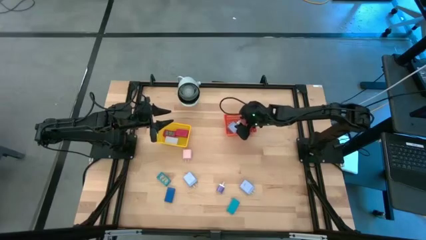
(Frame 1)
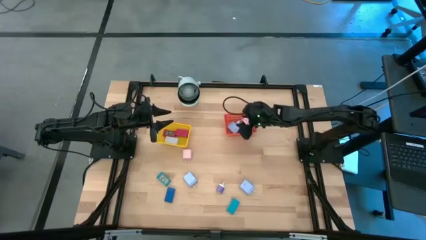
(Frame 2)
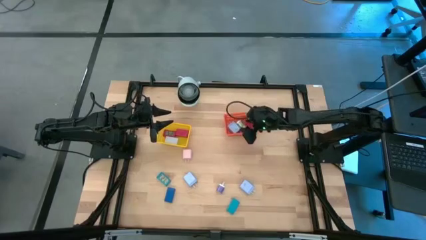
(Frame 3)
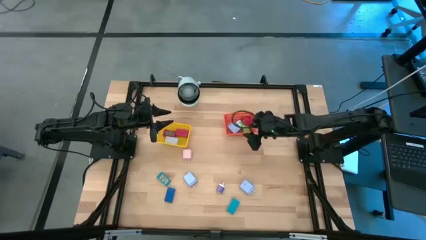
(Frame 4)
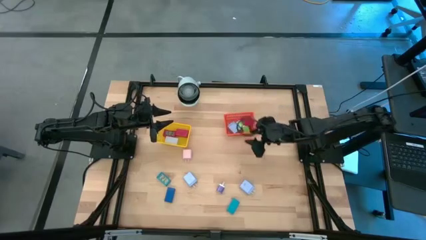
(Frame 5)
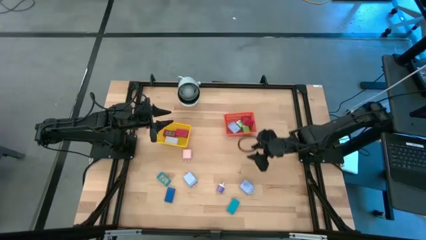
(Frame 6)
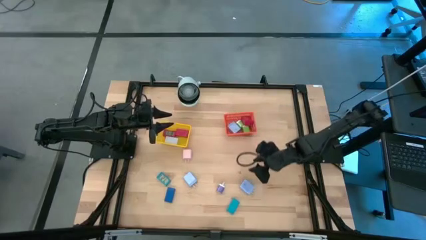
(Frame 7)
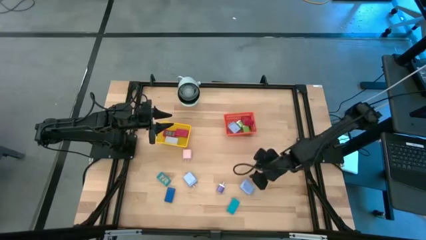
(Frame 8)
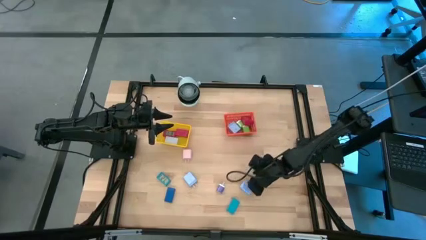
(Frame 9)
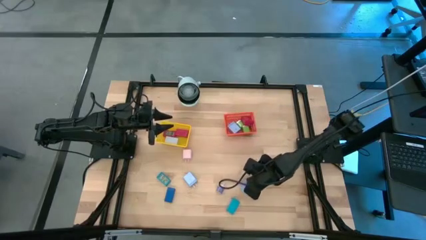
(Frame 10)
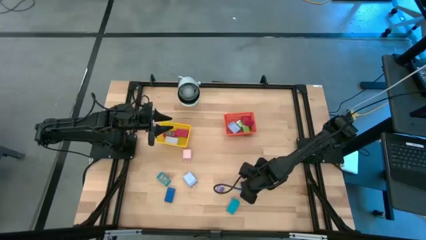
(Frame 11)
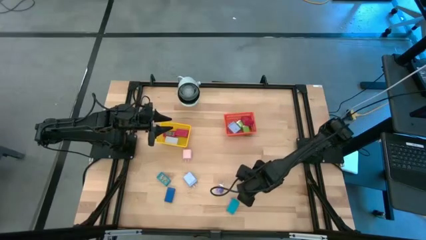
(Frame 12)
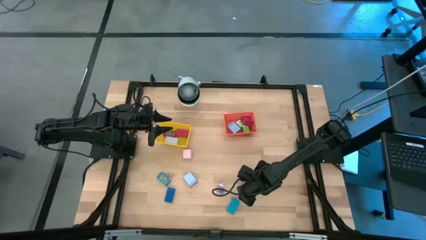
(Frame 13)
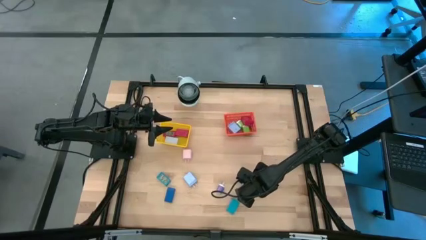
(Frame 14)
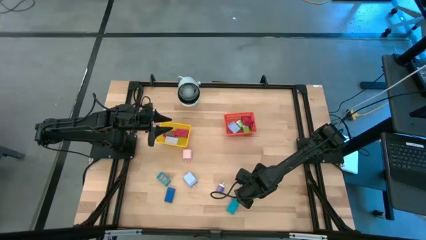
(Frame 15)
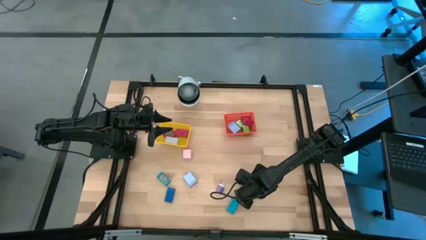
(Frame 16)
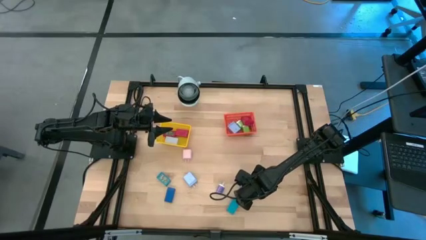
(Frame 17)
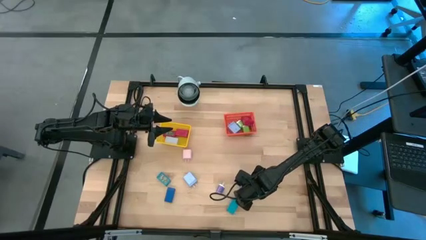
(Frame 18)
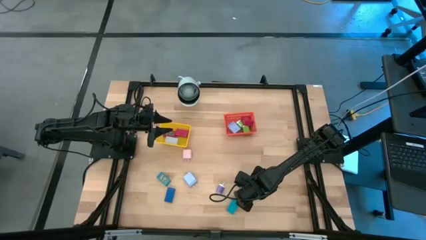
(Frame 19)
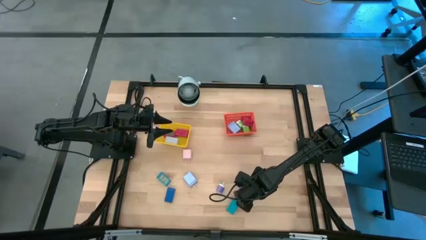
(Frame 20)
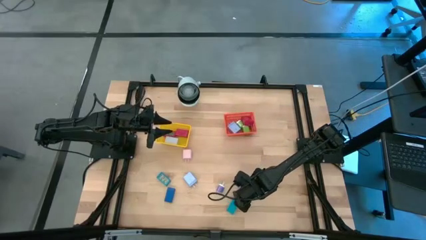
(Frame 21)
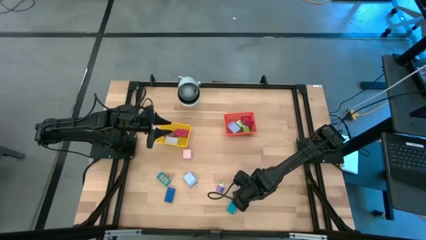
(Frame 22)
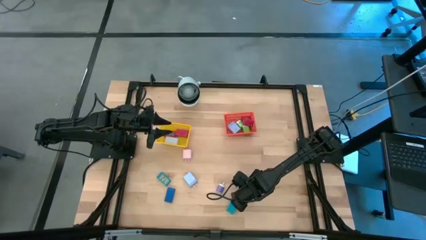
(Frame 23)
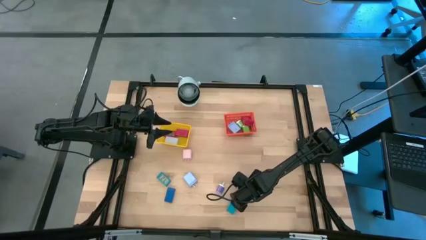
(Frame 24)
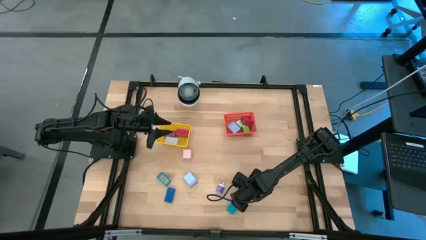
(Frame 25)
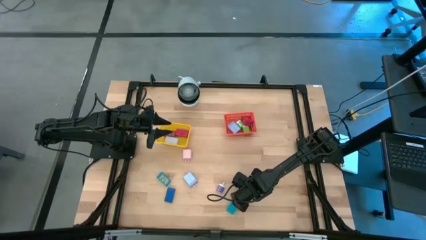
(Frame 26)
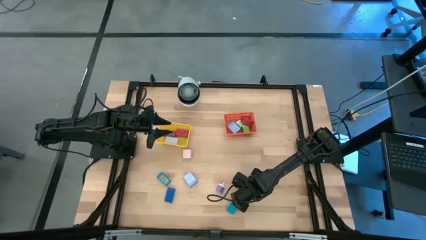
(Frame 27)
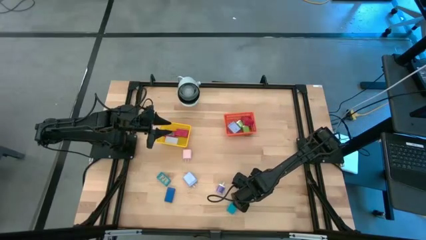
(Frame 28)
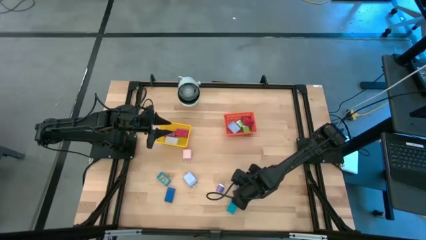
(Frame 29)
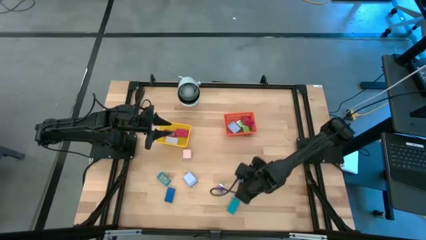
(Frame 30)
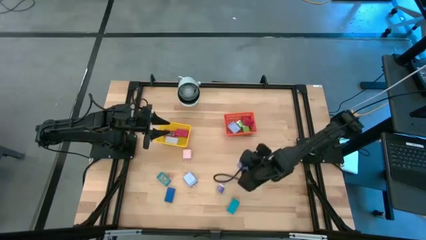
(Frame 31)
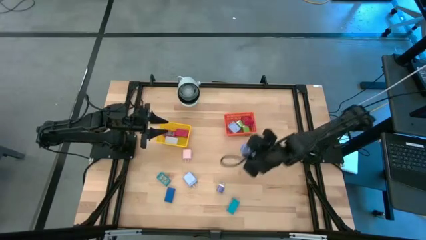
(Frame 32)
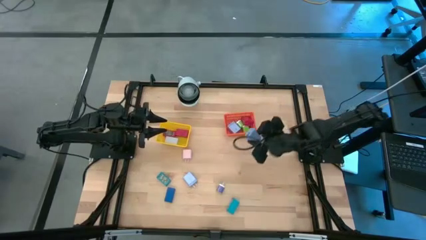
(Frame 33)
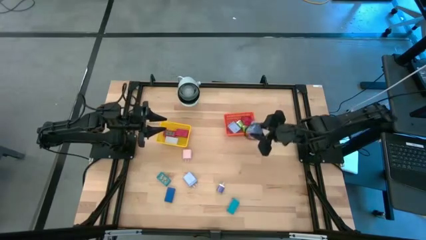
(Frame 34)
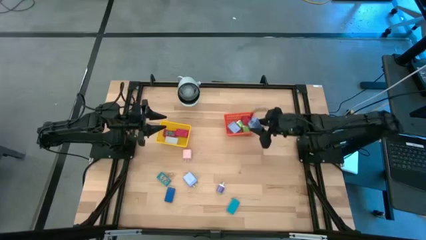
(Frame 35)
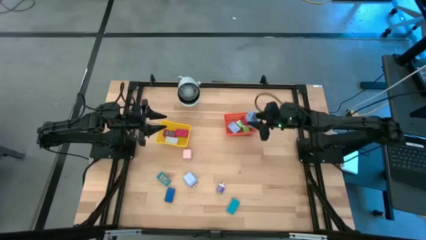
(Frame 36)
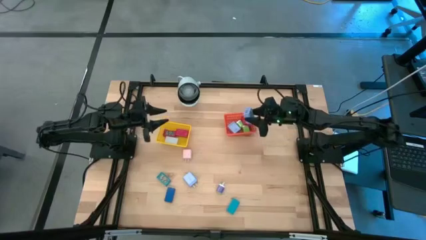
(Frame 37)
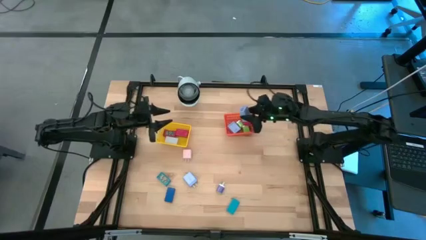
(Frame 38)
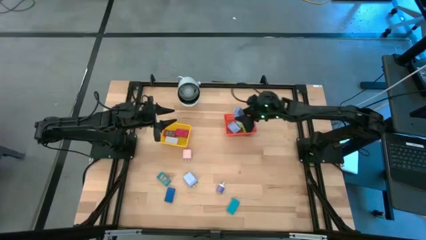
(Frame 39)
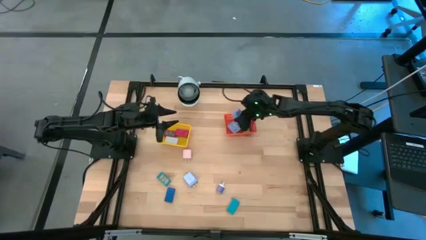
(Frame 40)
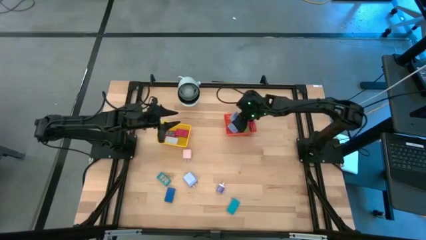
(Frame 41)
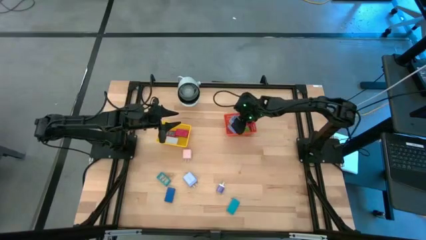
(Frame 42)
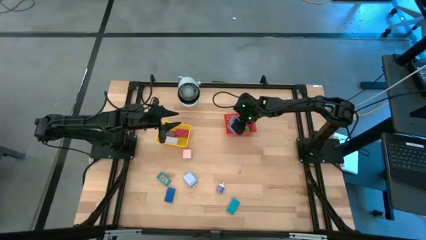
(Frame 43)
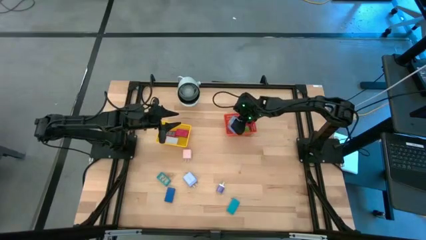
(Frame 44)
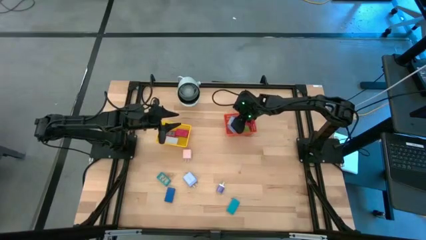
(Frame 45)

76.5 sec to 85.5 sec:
Task: Pick & Place Office items
Put the bottom light blue charger adapter into the orange bin

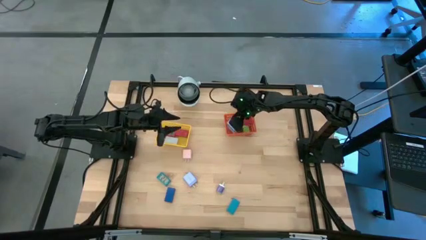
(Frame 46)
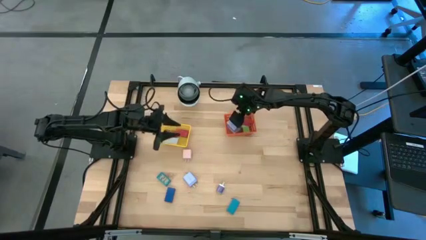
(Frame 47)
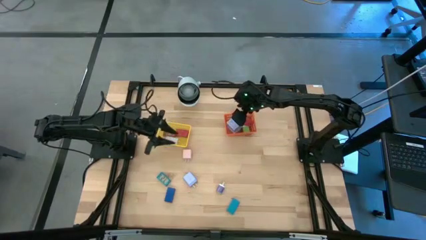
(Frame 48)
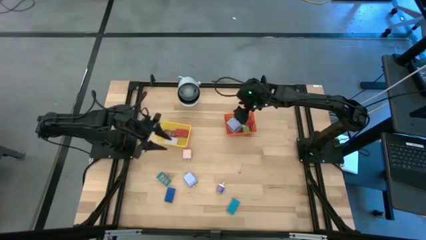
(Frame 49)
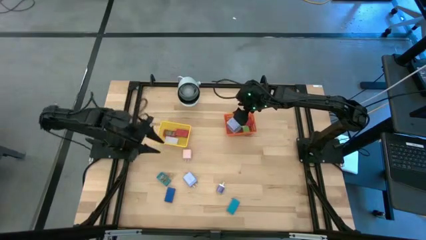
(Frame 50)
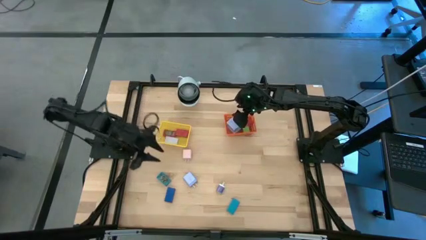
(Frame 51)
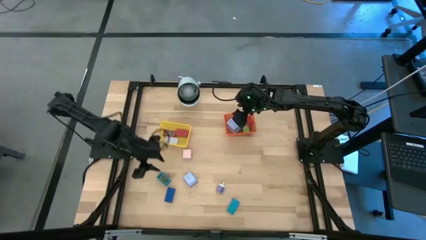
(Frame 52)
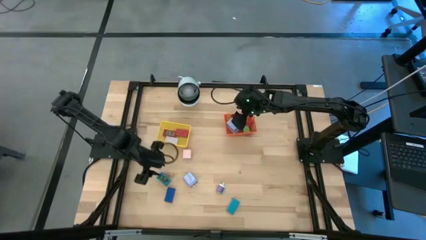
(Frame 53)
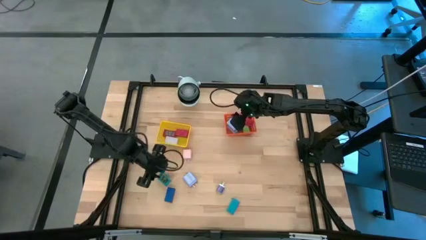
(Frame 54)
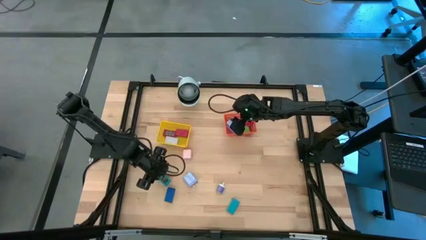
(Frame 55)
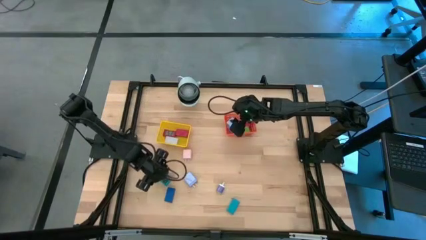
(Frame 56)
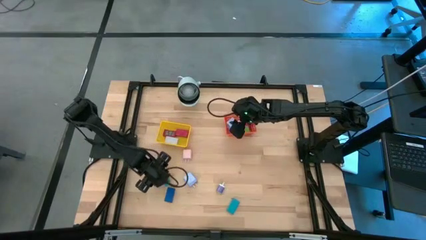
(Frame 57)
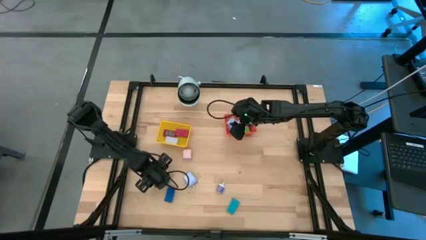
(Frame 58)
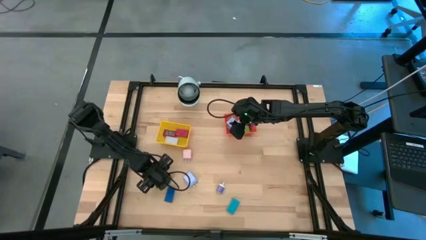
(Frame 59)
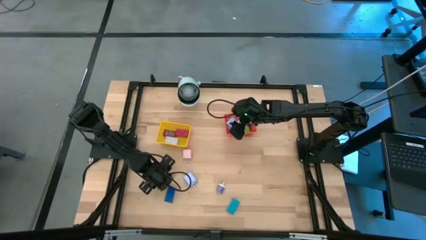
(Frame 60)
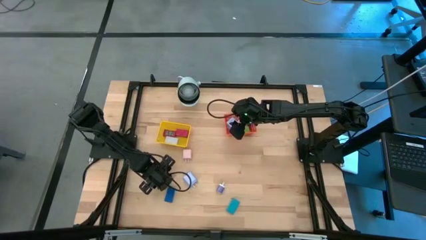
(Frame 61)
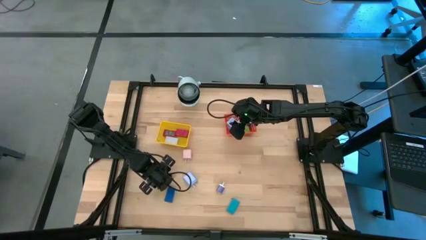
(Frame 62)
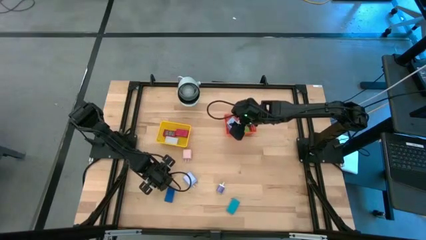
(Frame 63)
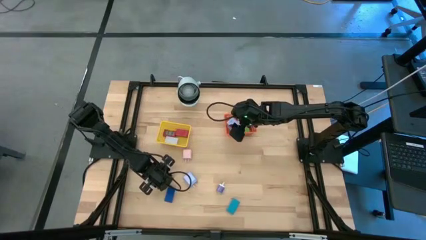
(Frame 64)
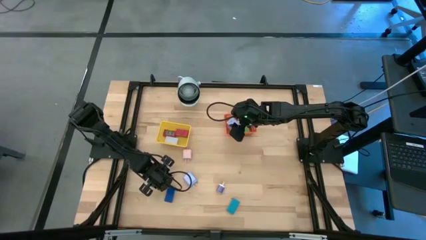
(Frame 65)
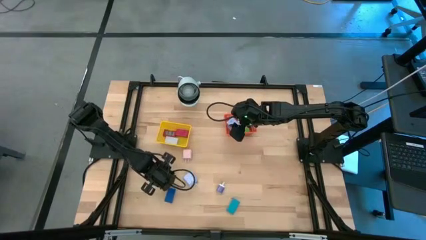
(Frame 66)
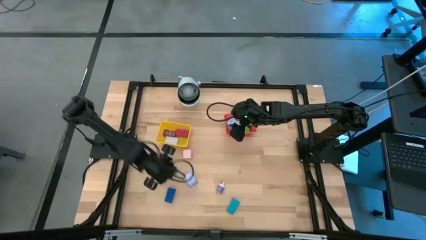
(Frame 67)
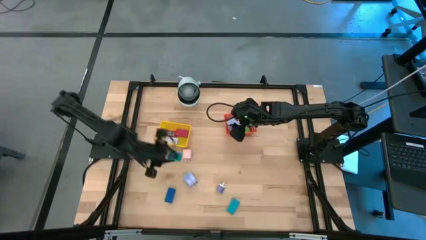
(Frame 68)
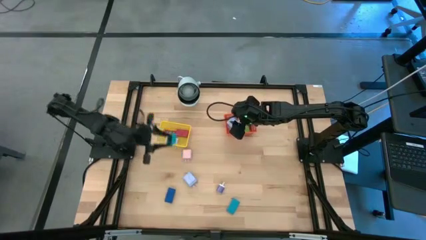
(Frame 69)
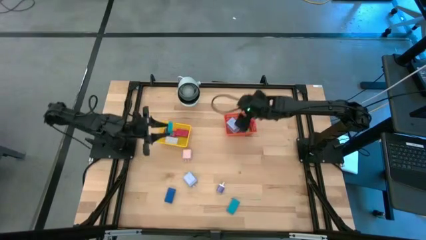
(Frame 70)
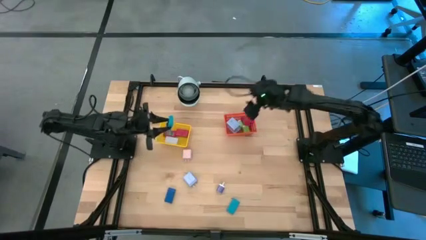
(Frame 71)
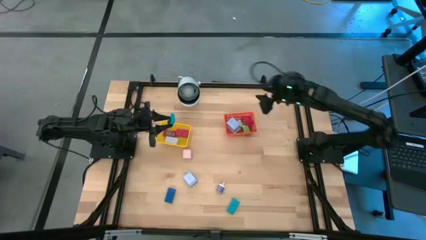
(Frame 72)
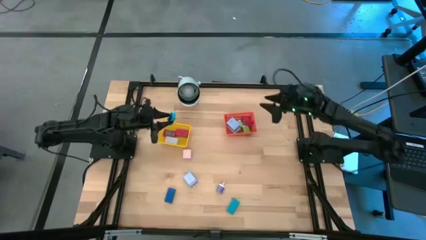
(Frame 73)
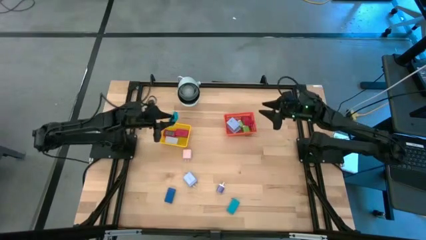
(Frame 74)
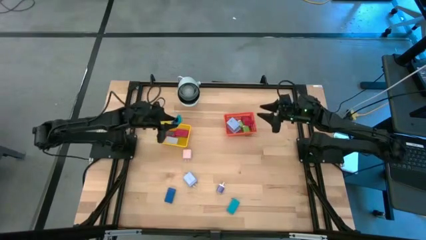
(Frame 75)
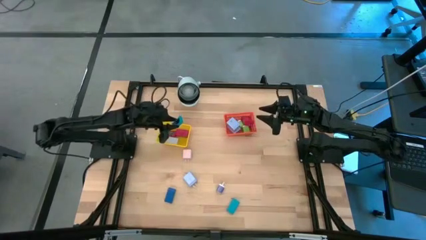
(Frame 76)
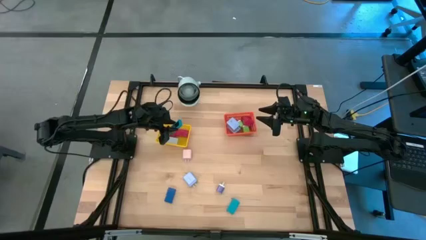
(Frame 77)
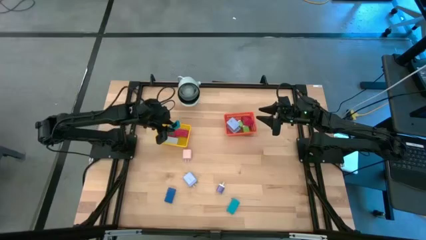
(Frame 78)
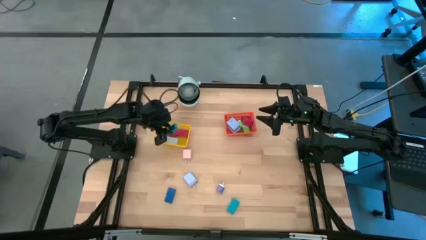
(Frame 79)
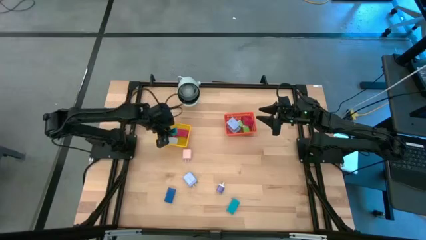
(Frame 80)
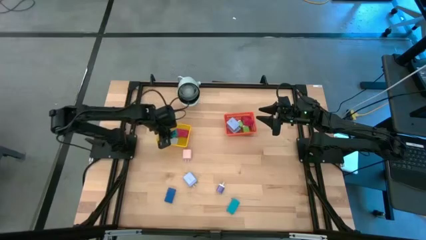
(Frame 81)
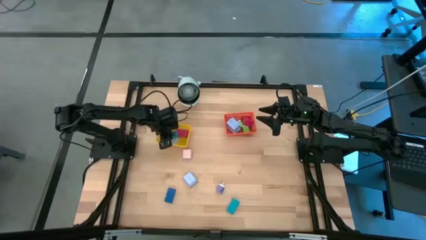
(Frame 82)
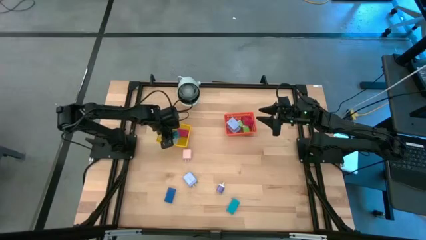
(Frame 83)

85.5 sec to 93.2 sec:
Put the top light blue digital timer into the yellow bin

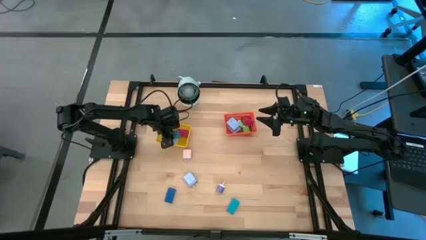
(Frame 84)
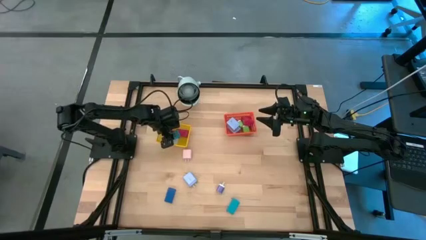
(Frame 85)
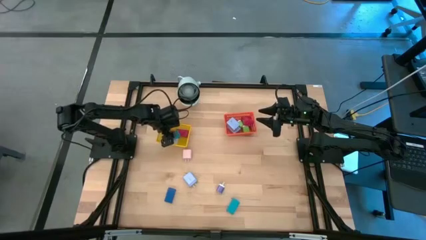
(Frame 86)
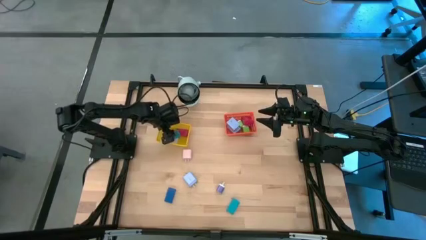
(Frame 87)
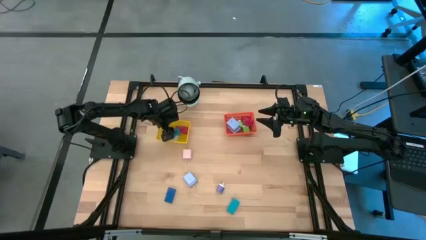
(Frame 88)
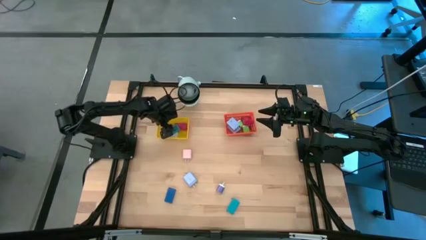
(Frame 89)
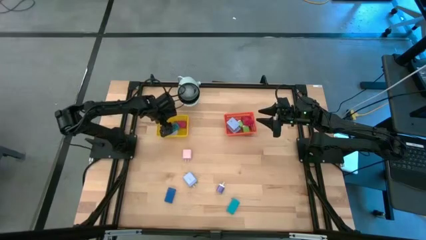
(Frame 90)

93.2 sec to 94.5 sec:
Adjust the yellow bin
